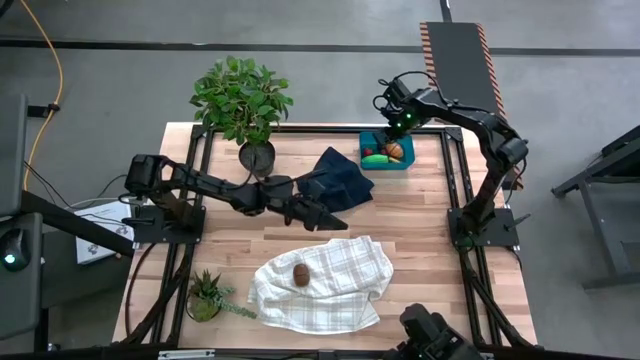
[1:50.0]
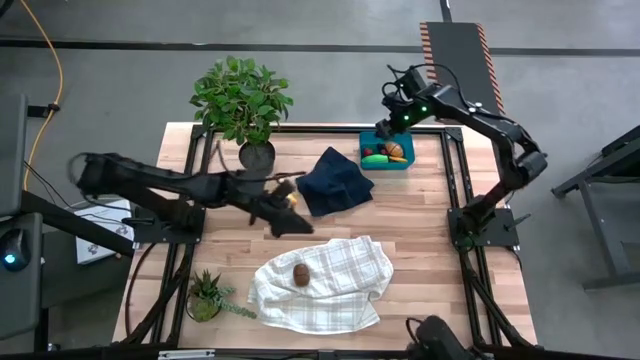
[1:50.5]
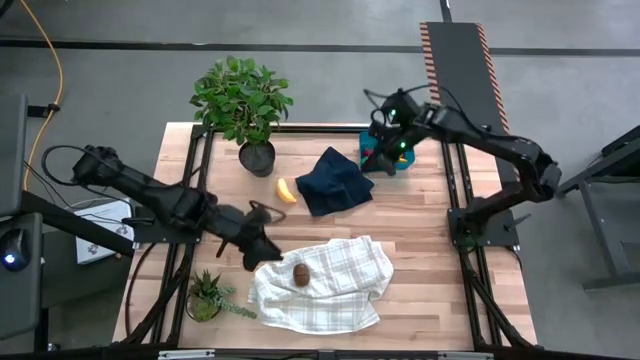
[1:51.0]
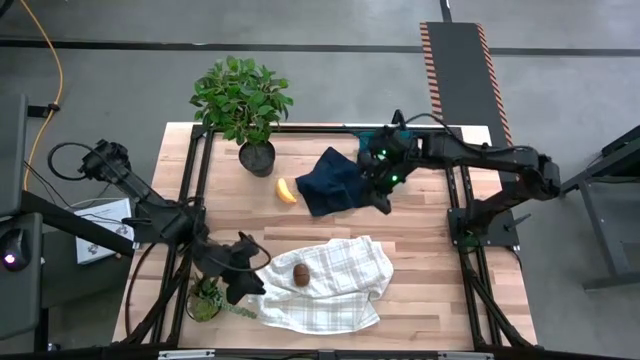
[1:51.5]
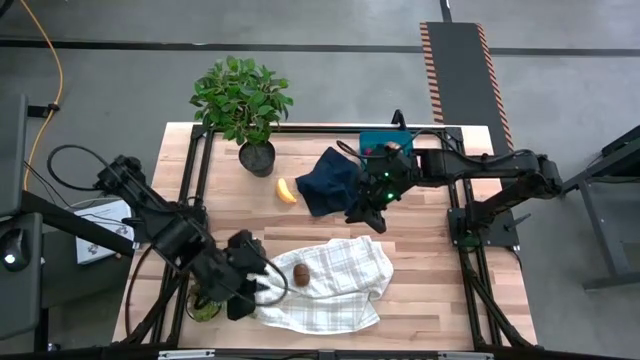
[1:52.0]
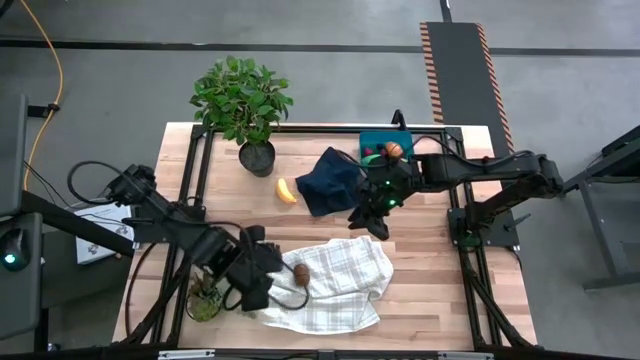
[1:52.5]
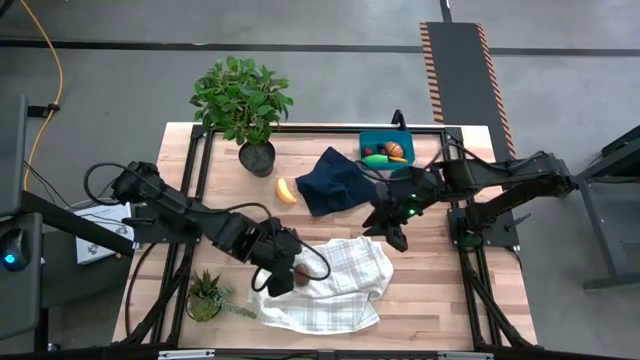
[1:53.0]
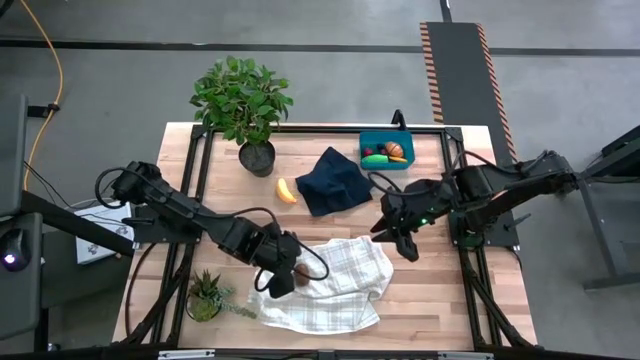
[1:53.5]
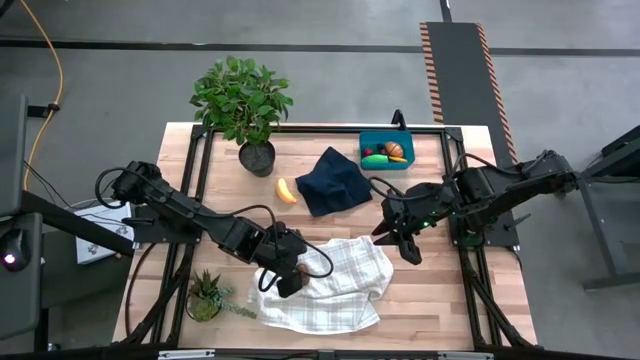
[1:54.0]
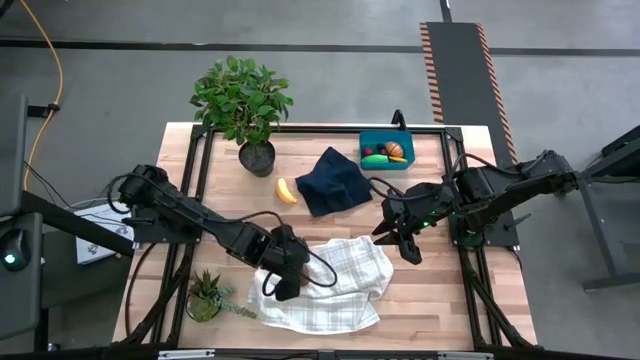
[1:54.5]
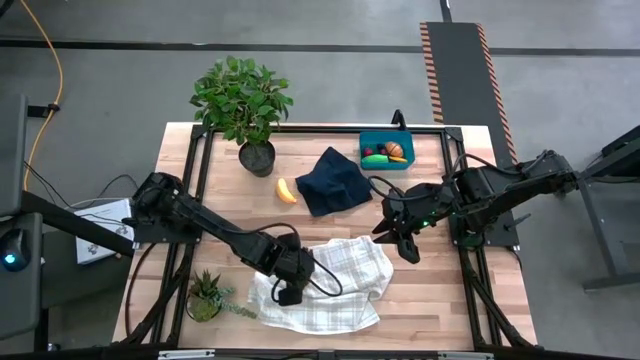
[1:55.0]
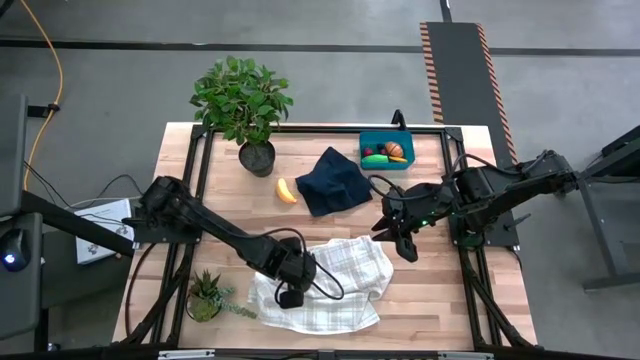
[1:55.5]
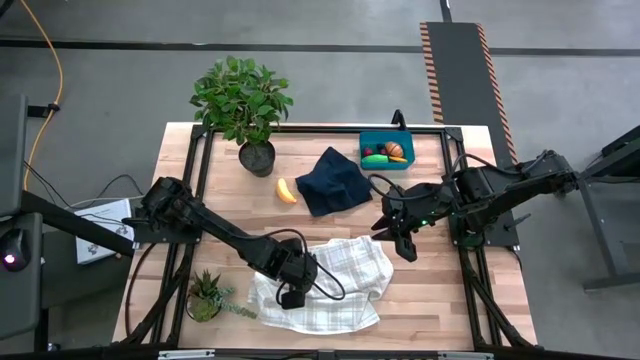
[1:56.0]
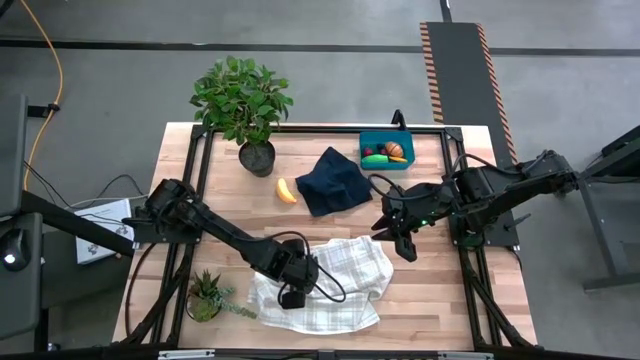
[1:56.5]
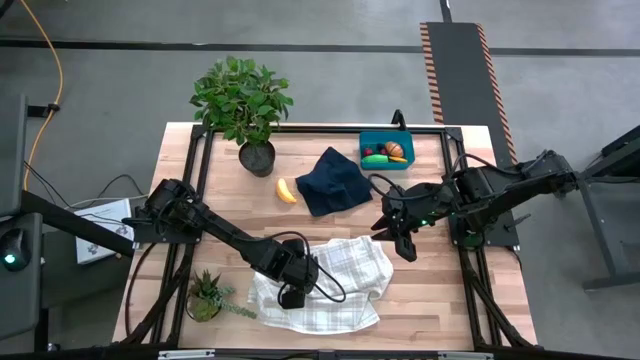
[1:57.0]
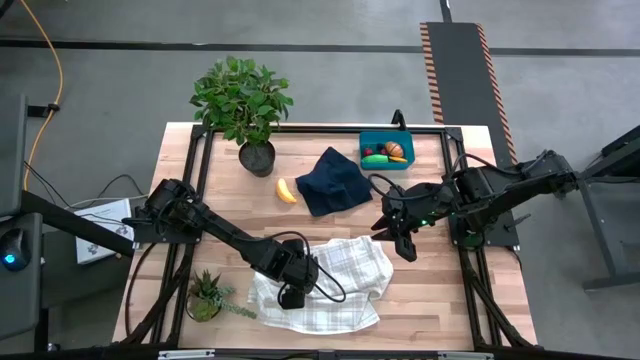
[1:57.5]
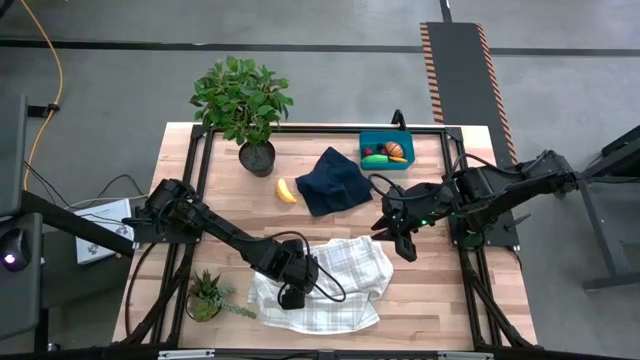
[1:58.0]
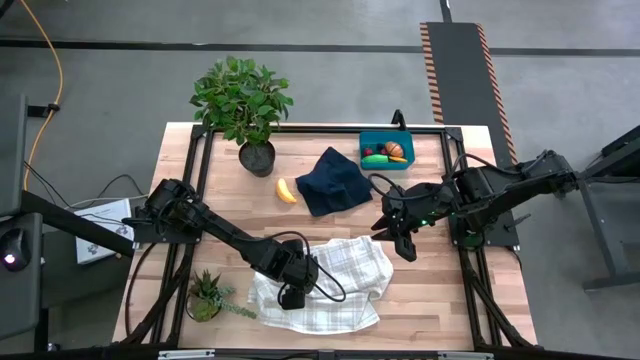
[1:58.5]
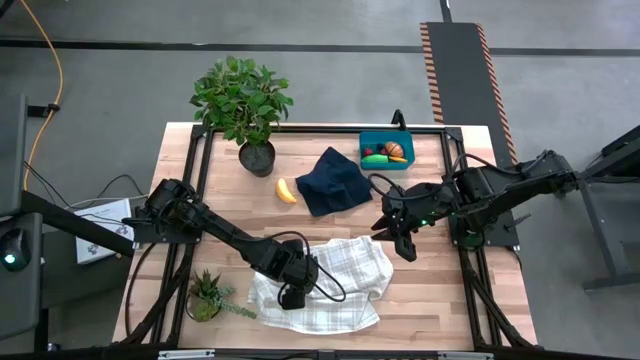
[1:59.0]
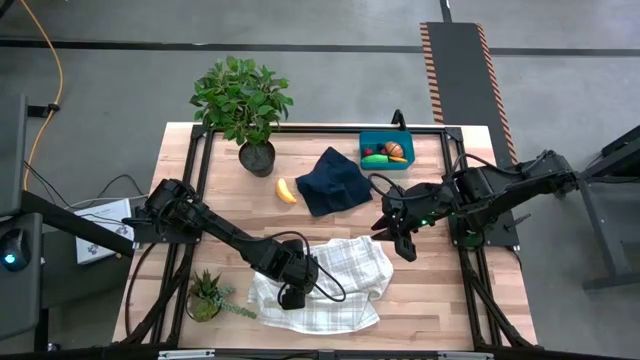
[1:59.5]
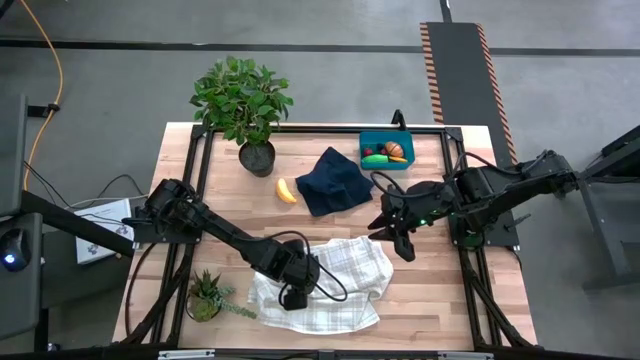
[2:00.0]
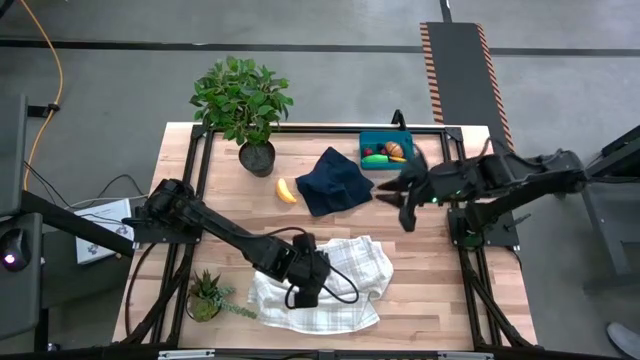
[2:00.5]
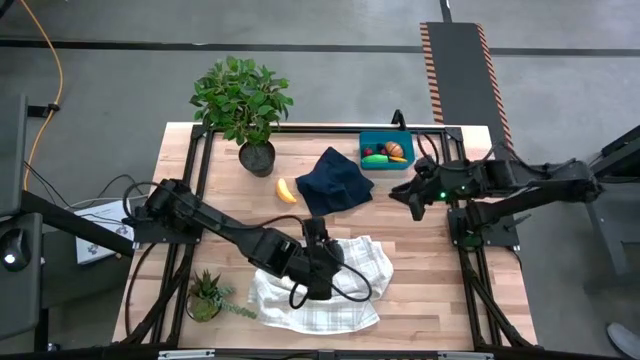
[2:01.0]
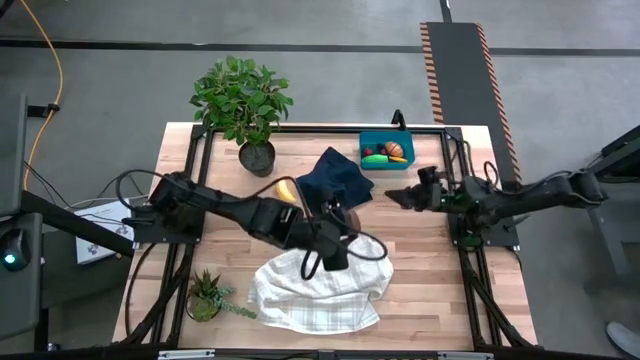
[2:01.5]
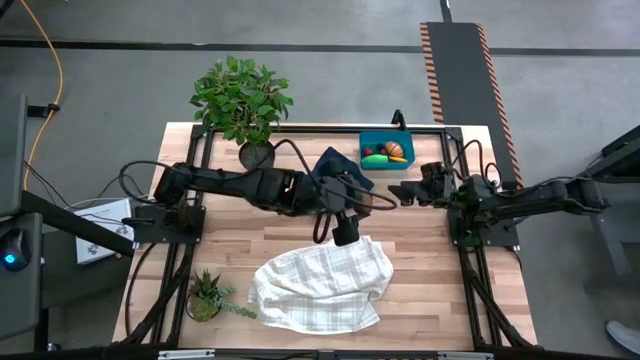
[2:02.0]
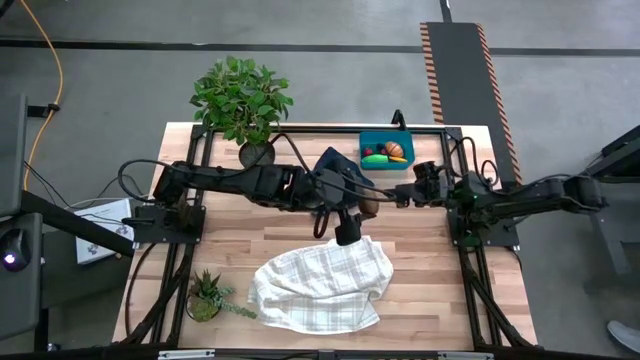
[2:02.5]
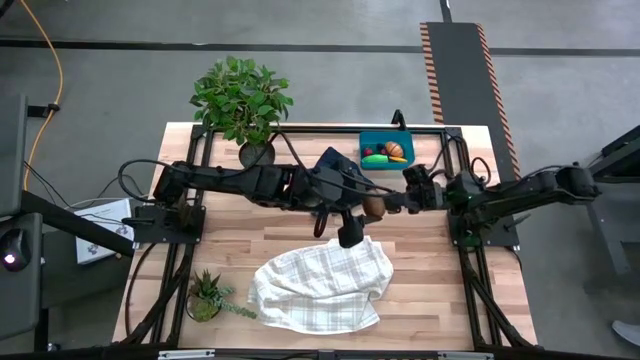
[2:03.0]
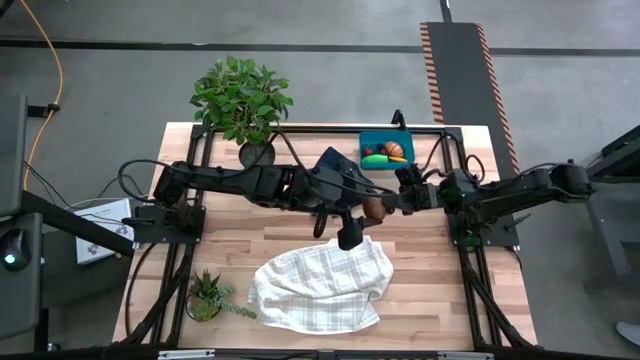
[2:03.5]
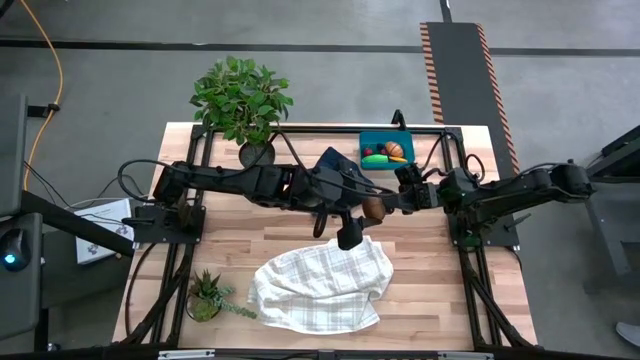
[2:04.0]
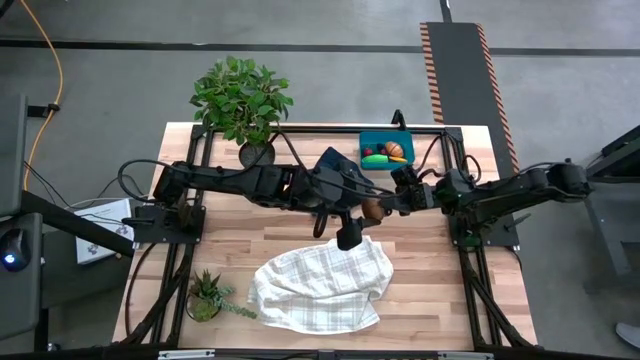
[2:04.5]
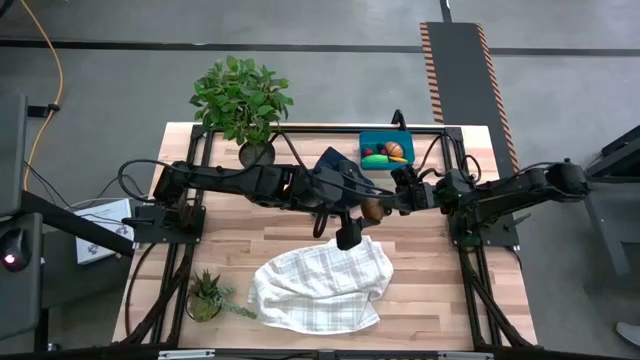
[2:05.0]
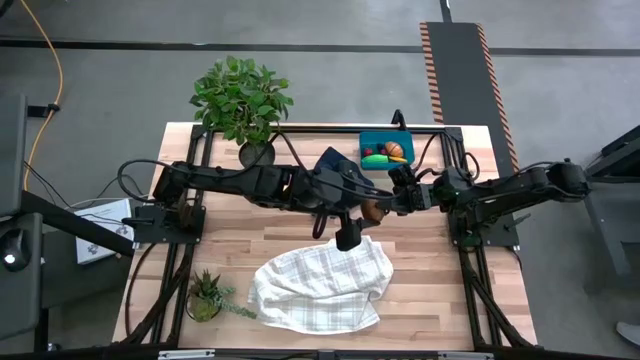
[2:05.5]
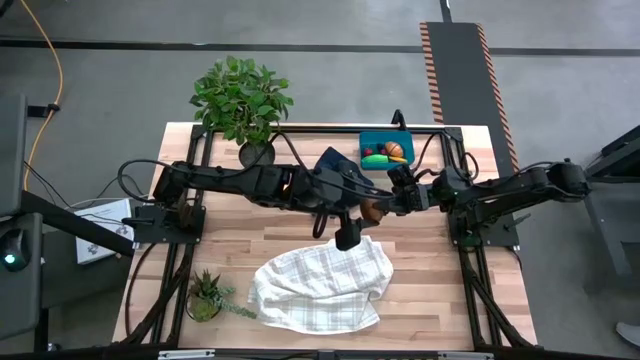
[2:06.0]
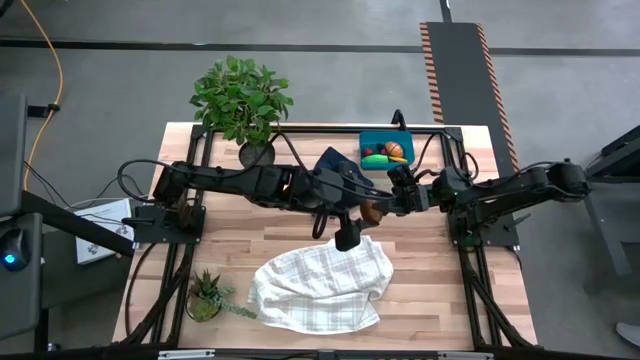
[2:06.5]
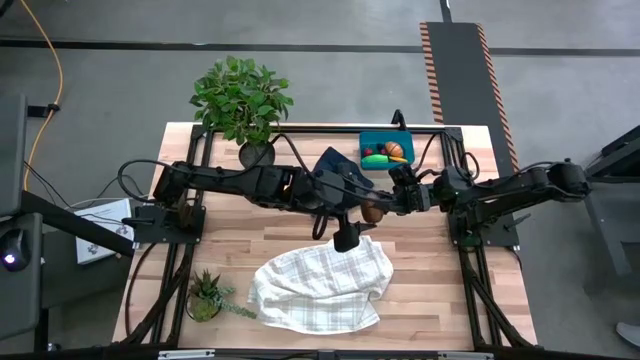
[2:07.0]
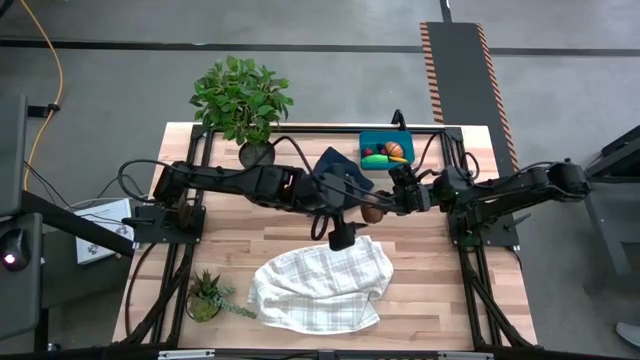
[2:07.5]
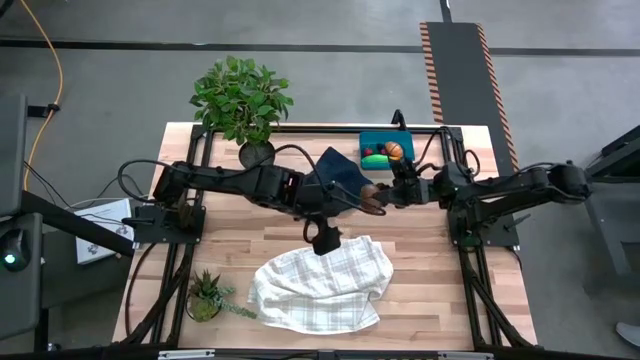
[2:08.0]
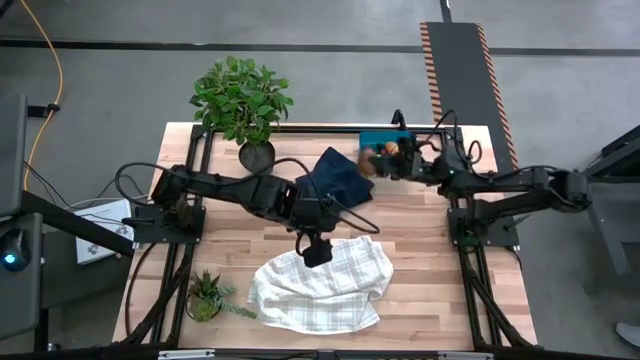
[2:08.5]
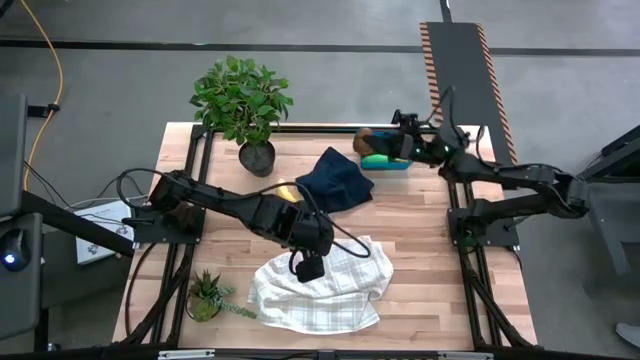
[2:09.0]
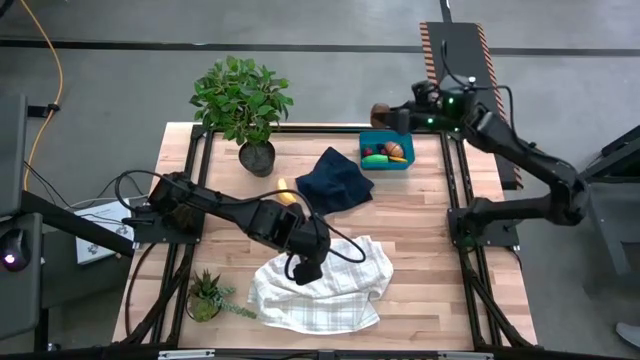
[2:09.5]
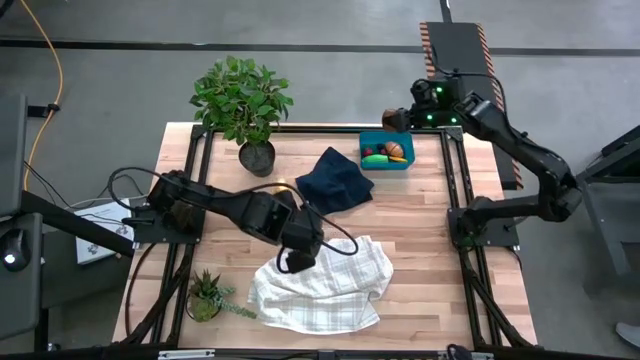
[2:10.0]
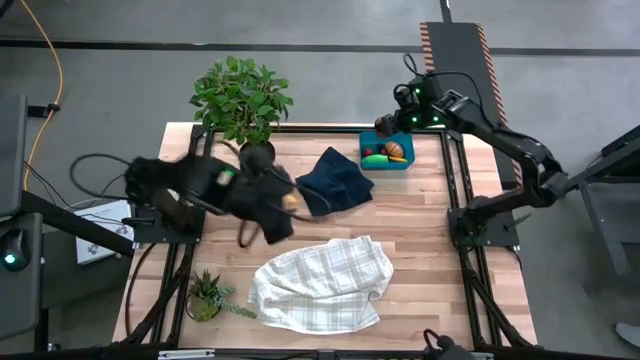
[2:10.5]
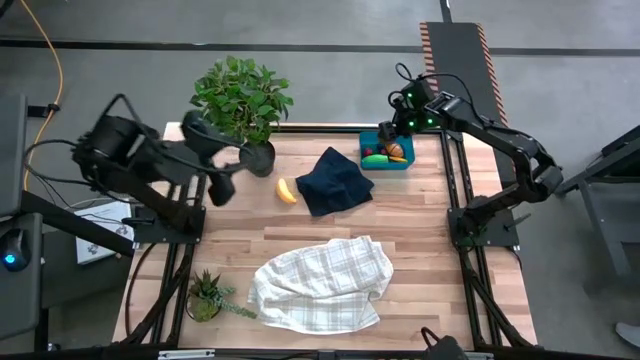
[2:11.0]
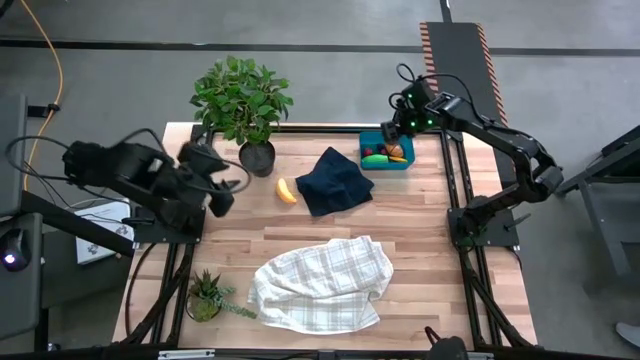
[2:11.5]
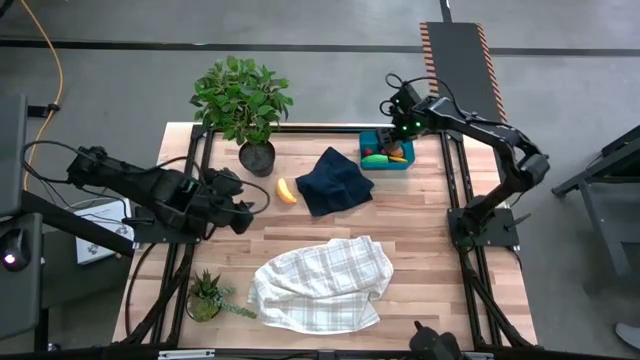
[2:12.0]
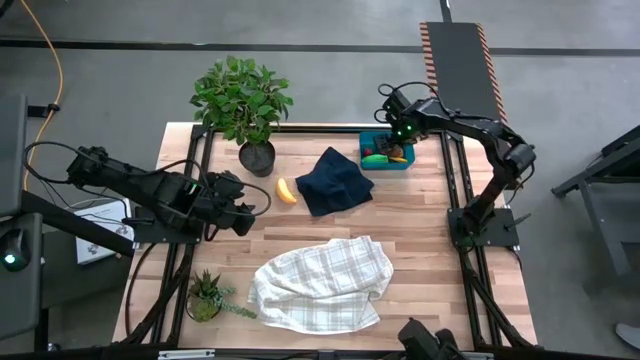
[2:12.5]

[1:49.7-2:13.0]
Task: Pick and placing Produce into tupperware
Put the brown kiwi into the blue bin
